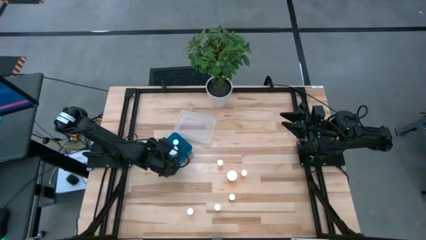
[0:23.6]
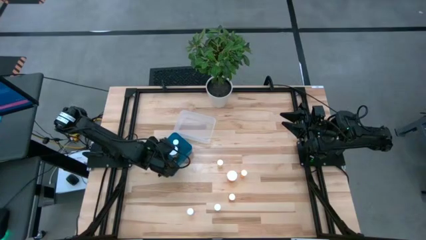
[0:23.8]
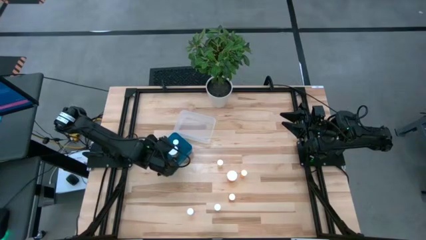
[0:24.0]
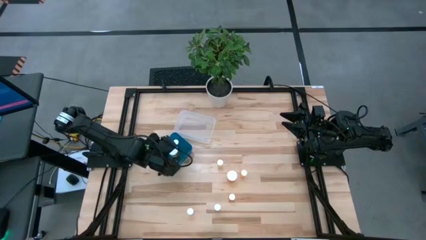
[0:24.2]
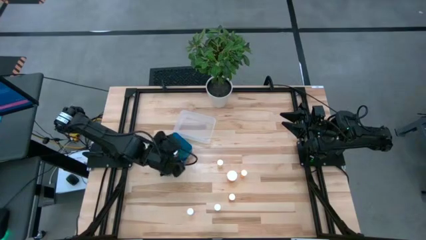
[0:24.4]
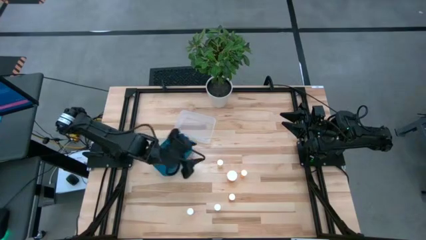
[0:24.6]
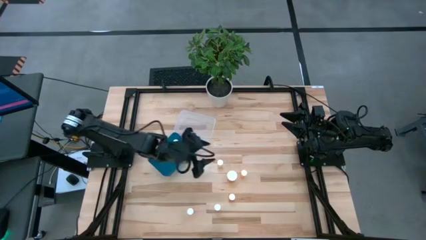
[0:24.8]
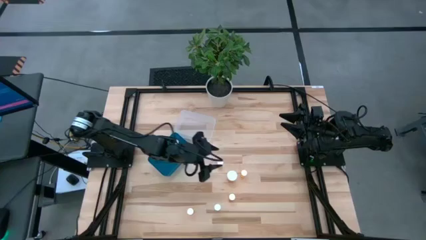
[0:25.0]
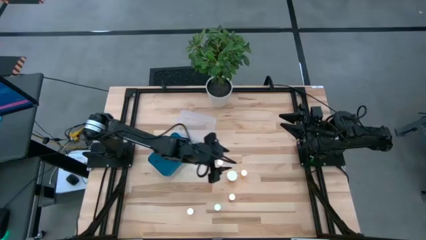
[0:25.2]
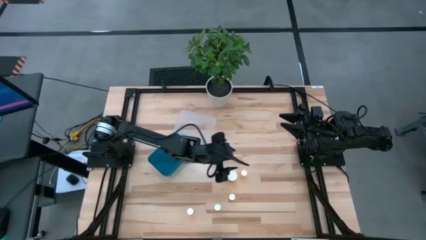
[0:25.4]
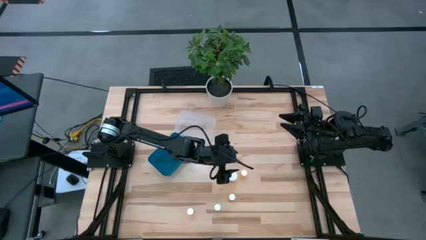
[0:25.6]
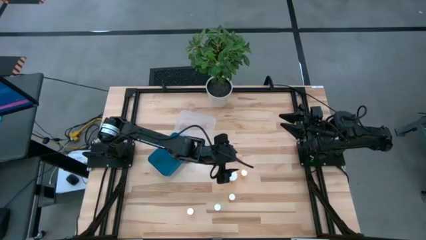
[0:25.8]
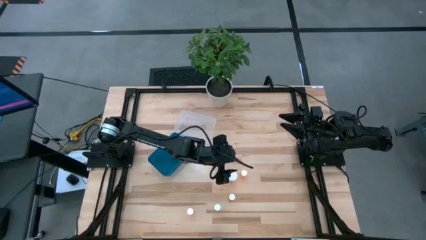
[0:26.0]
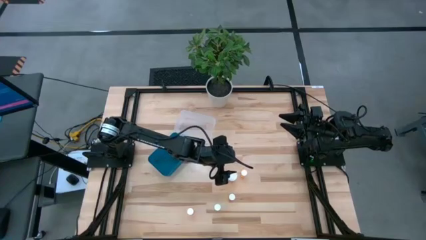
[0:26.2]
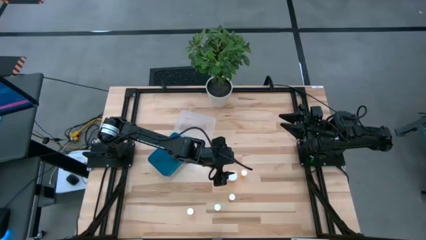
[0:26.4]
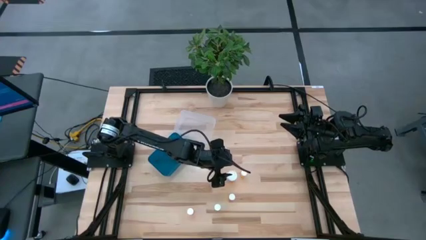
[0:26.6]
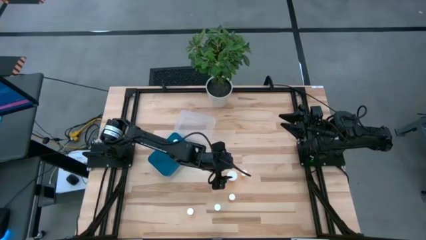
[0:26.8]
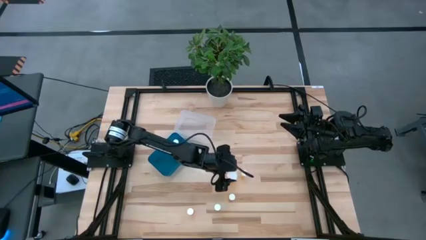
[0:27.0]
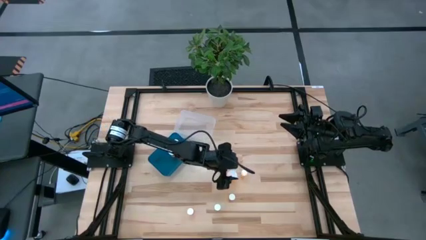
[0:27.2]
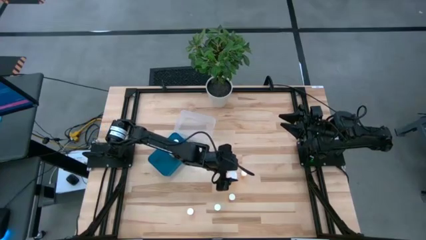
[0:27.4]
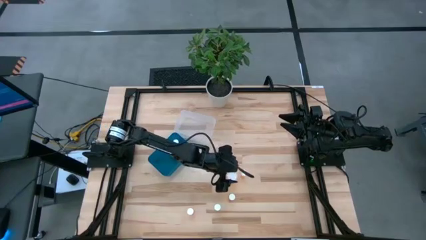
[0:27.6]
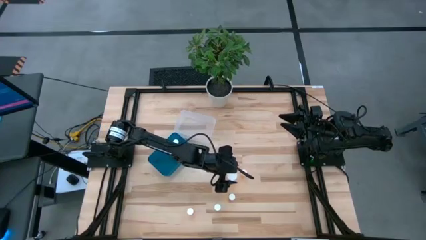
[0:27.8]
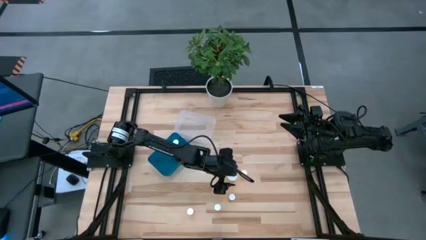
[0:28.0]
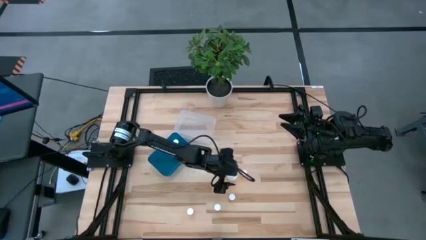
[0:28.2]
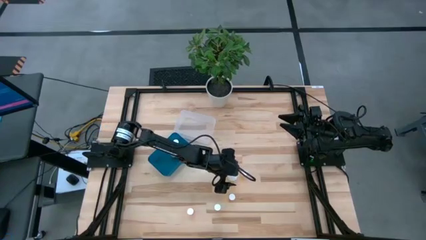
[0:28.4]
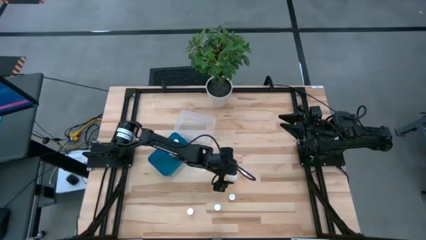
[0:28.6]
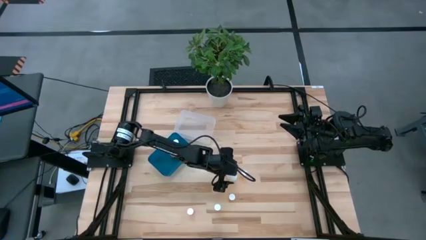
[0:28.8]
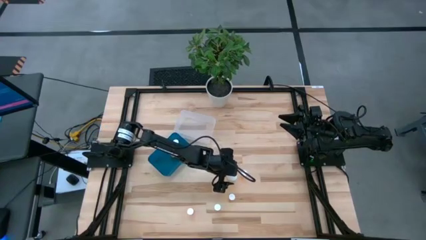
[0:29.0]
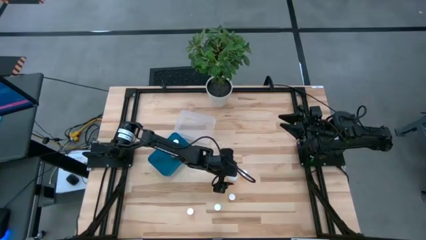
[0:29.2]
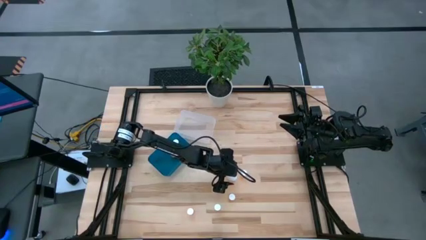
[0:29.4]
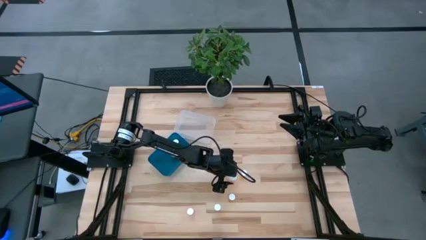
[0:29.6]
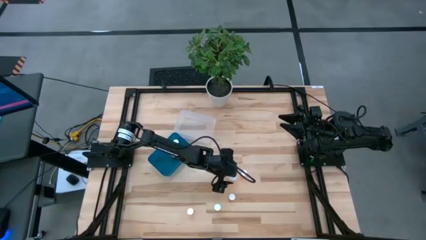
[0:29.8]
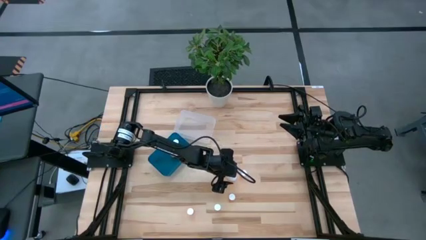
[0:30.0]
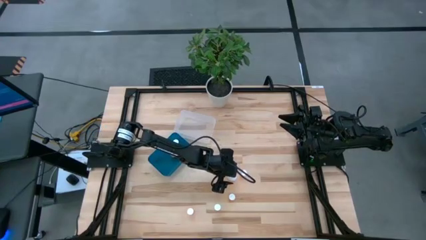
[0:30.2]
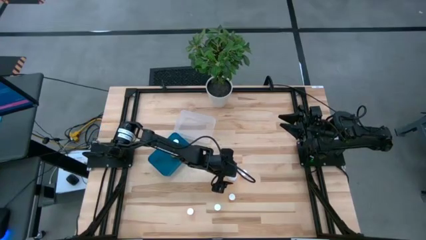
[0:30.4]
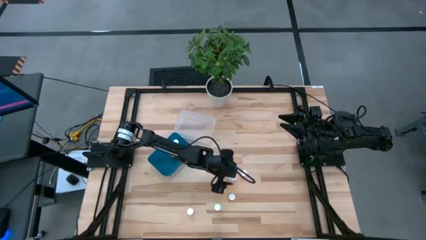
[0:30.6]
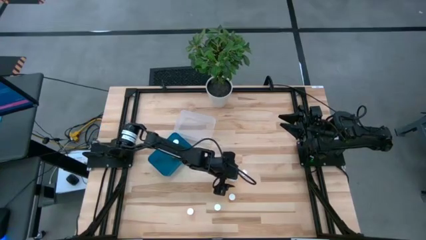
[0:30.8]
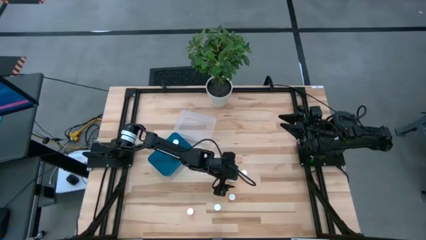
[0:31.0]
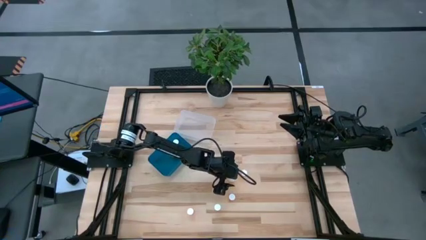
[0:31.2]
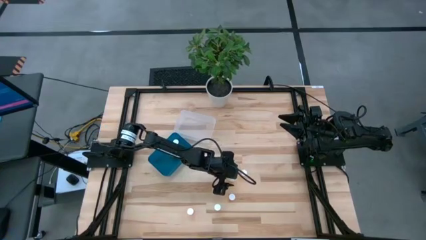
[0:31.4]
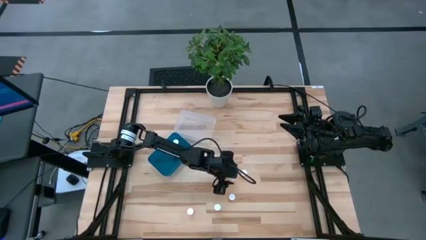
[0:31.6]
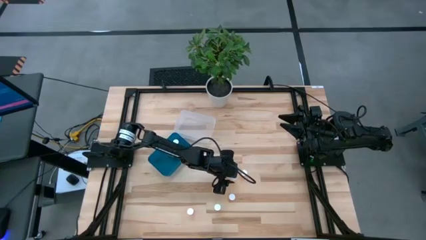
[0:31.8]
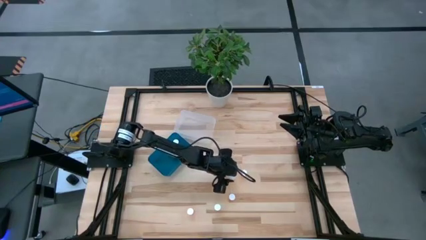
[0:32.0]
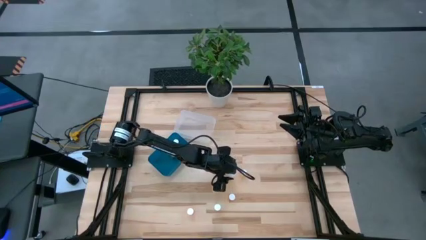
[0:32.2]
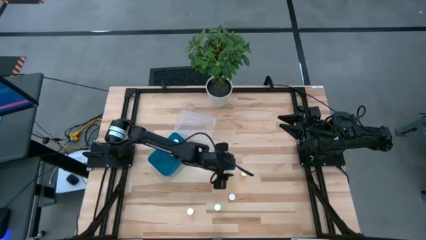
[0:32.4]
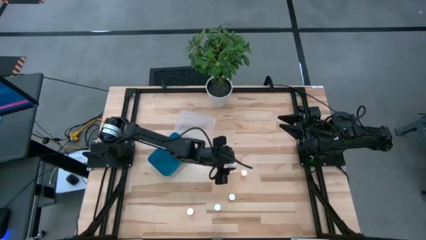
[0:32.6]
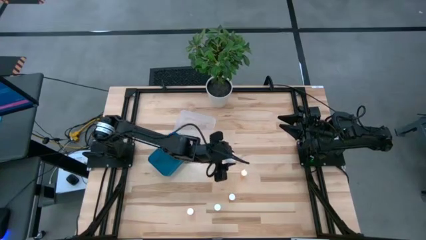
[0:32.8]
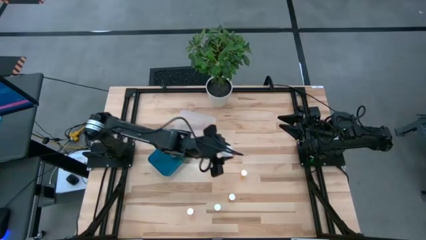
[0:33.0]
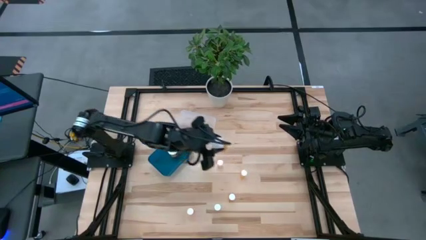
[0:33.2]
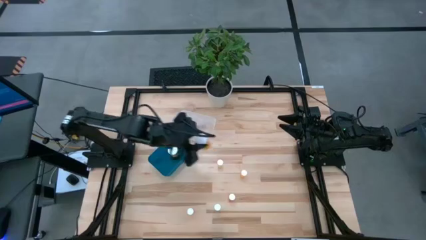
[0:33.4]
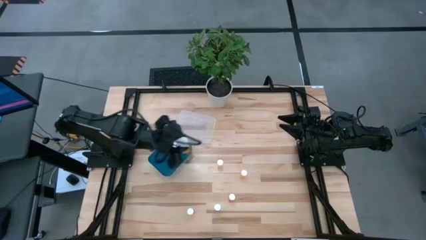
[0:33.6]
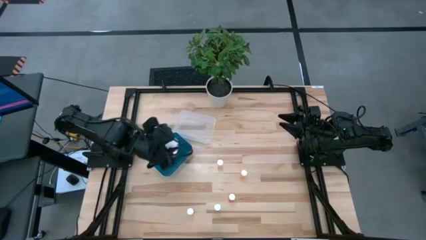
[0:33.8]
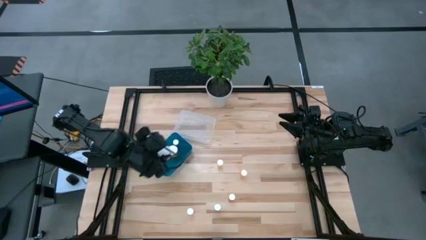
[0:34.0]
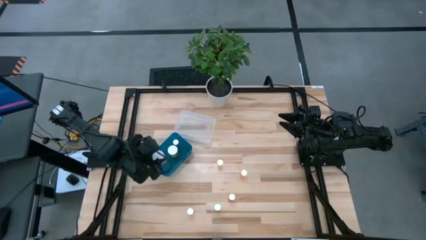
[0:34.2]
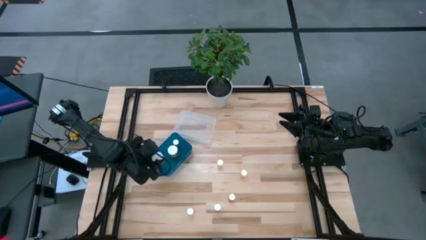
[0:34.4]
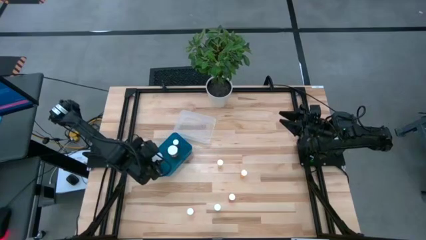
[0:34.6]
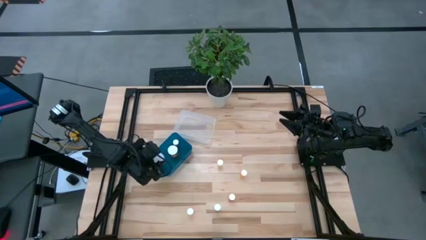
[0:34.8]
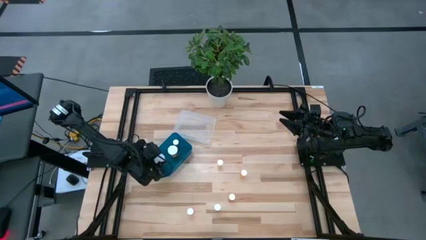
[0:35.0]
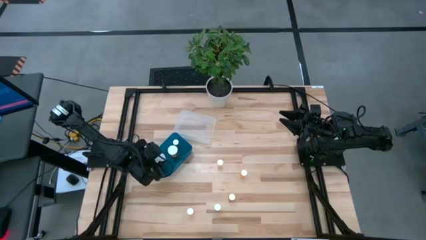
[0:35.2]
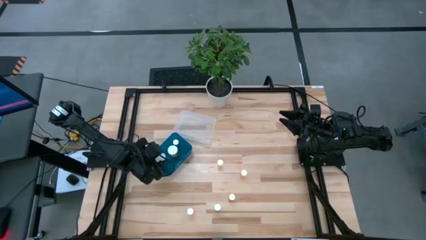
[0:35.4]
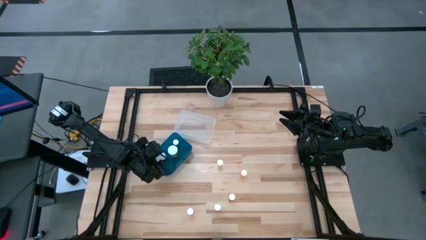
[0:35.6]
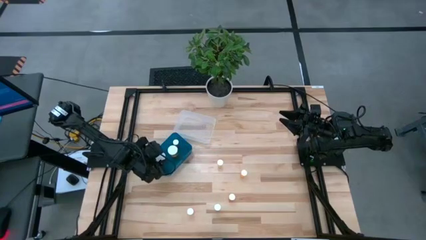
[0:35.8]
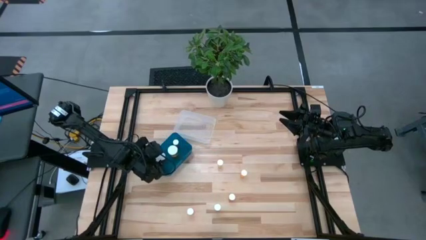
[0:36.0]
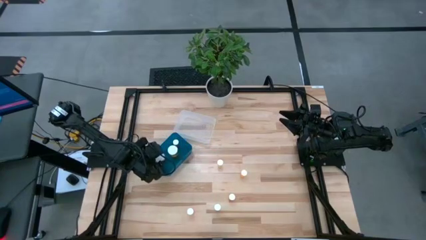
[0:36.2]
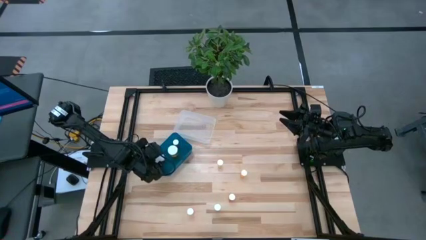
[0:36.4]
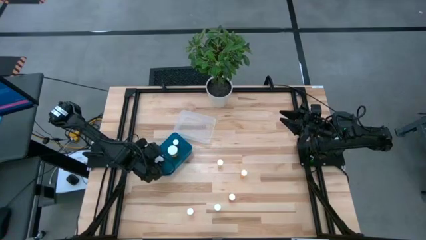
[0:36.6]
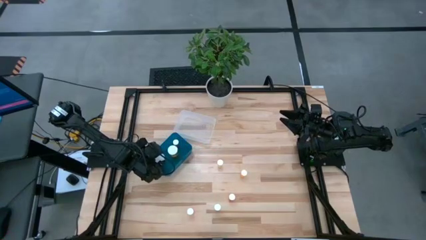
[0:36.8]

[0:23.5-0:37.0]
Task: Pick and place medicine bottles into bin by pill shape (circle, oval)
Put the orange pill bottle into the blue bin

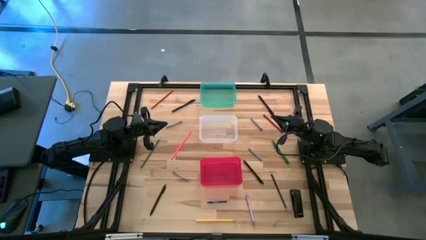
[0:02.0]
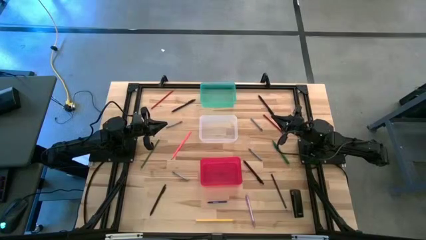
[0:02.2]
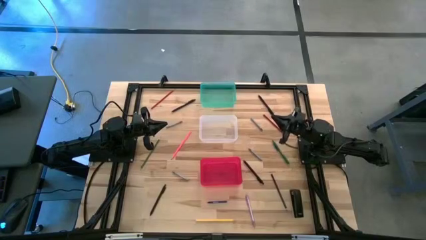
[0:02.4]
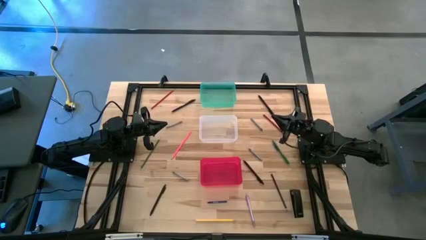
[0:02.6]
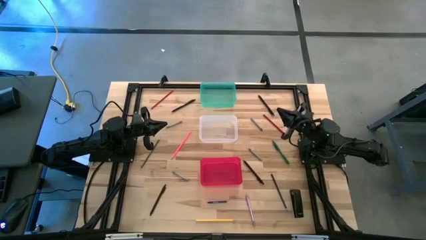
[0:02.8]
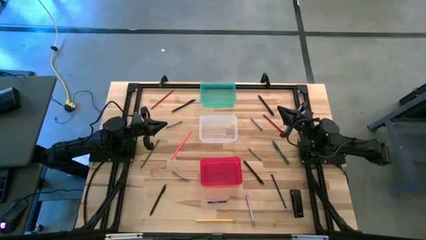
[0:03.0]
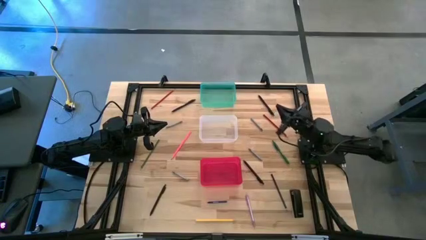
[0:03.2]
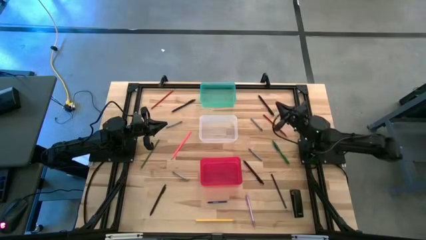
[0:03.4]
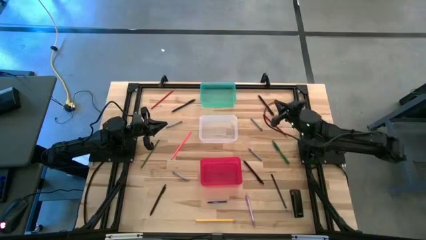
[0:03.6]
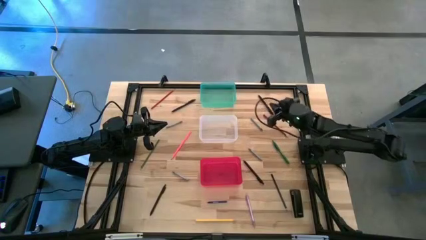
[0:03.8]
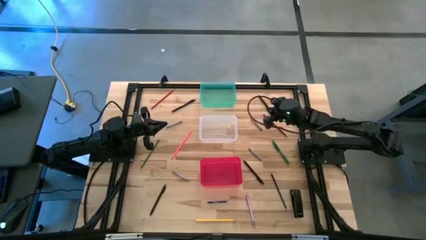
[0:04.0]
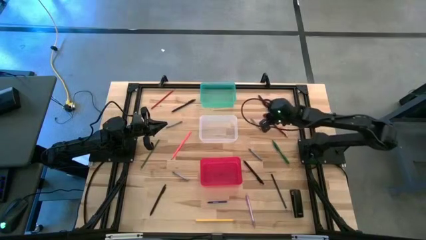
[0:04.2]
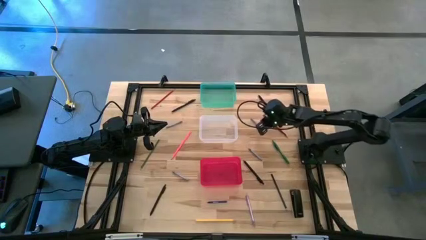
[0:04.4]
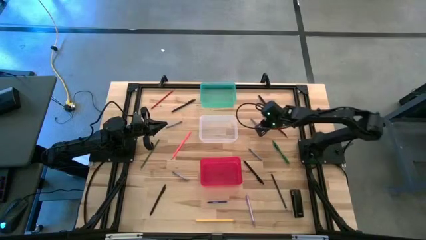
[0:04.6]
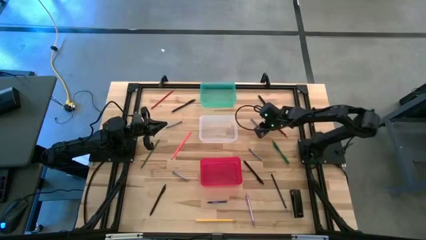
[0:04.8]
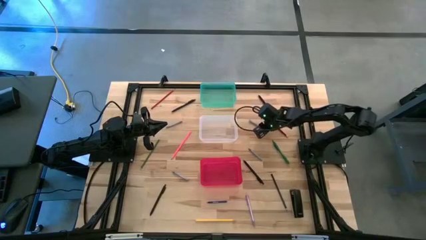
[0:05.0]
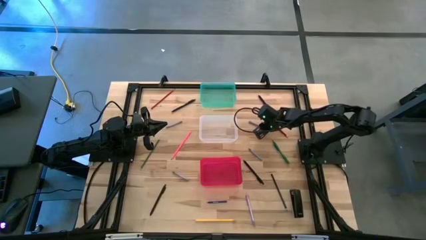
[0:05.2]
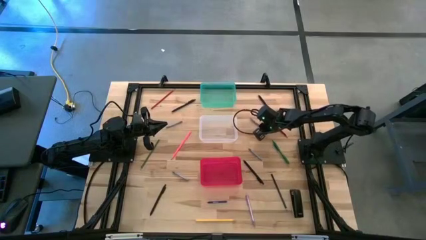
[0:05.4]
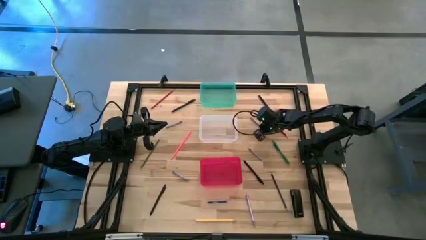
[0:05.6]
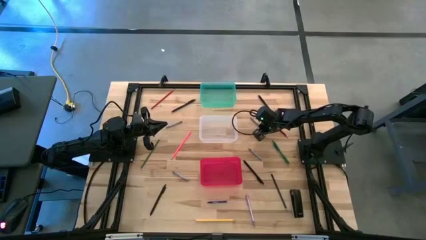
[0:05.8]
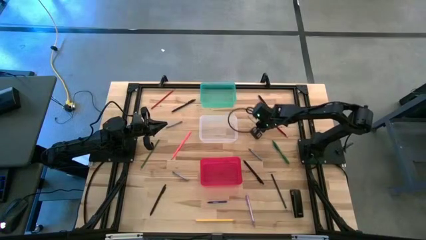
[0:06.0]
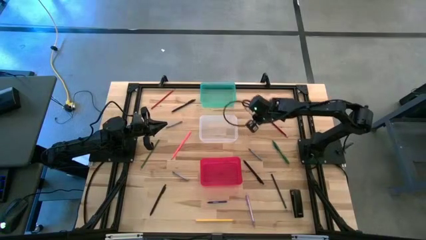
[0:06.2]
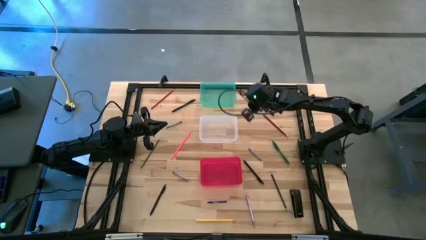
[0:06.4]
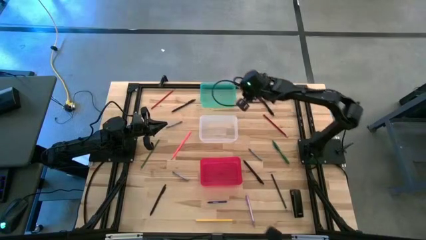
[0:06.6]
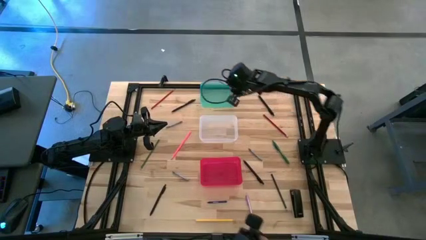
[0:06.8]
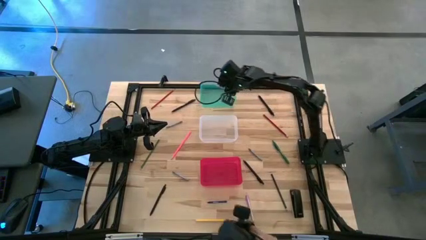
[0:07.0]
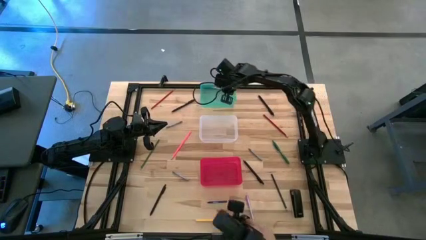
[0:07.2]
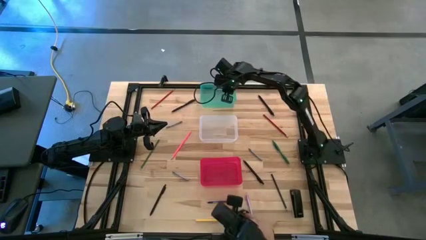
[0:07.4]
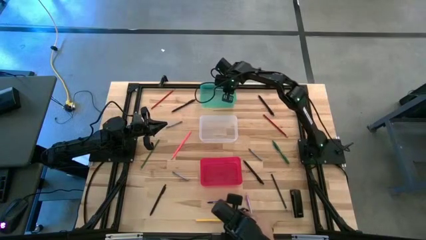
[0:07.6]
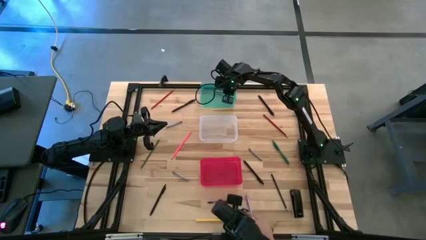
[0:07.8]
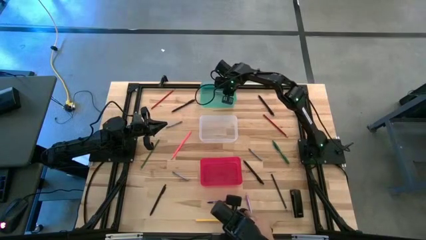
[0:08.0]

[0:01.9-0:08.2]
Task: Sort crayons/erasers/pens/pencils in bins
Put the top right gray crayon into the green bin
